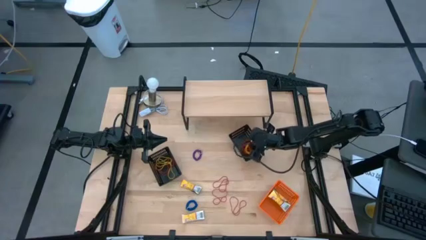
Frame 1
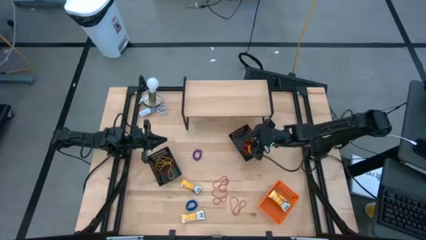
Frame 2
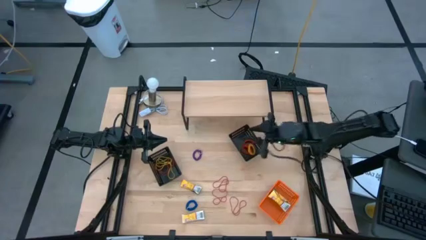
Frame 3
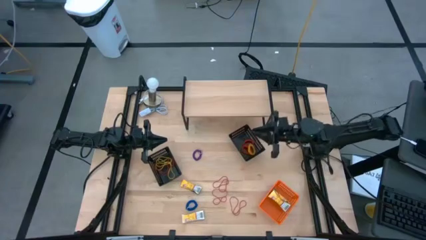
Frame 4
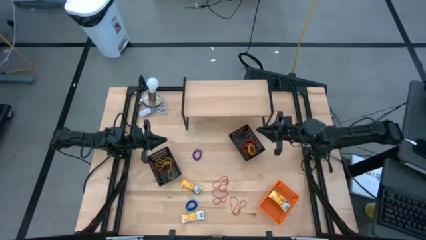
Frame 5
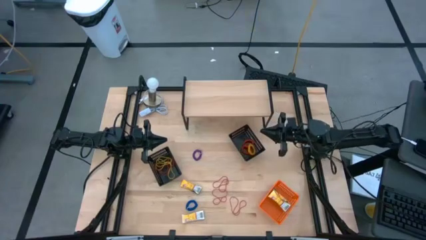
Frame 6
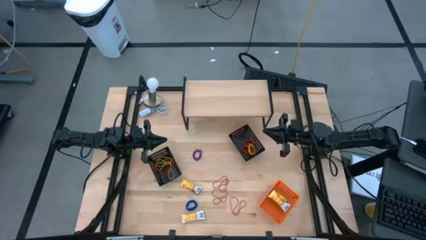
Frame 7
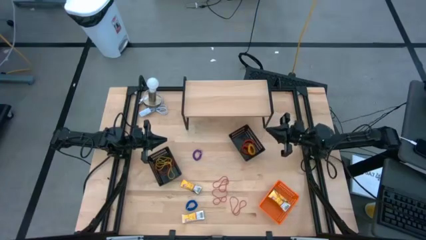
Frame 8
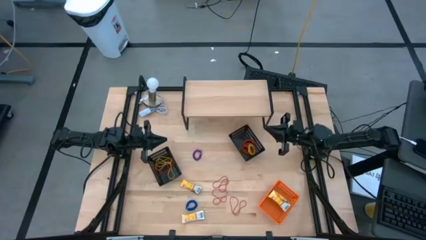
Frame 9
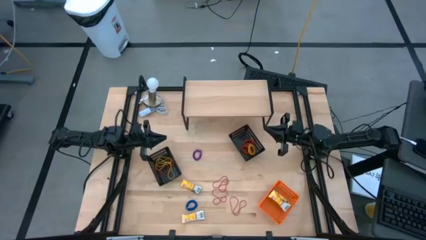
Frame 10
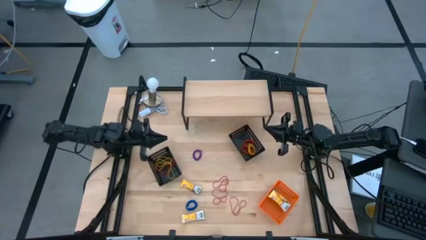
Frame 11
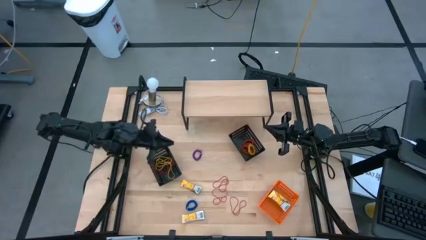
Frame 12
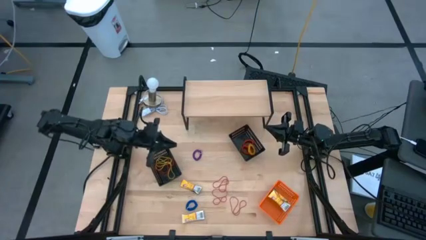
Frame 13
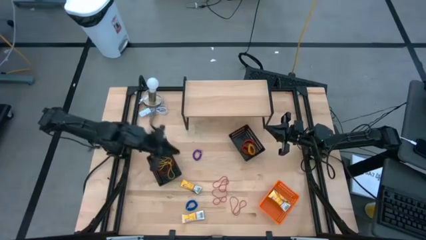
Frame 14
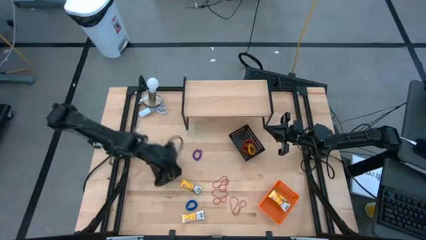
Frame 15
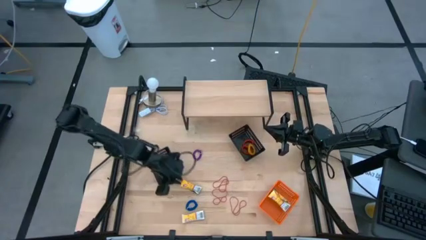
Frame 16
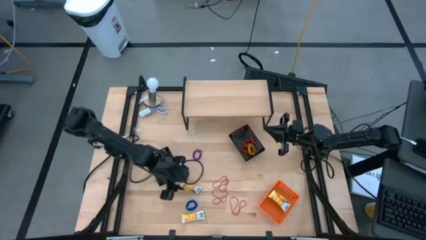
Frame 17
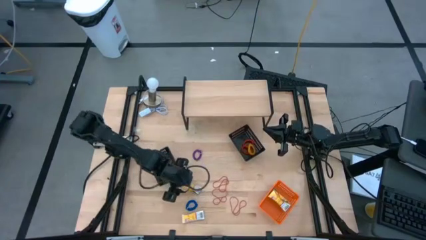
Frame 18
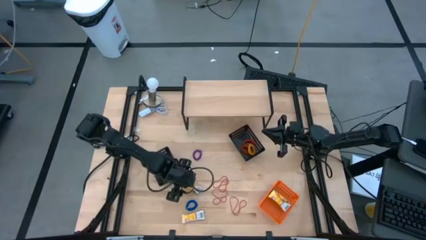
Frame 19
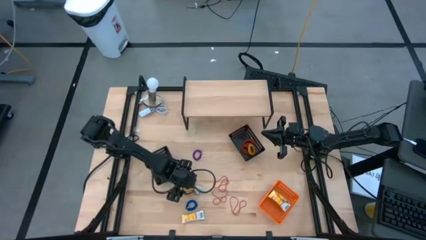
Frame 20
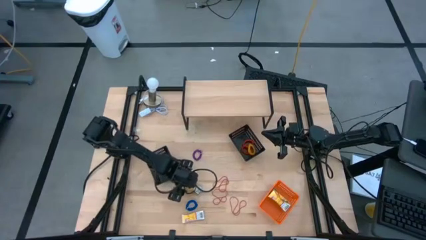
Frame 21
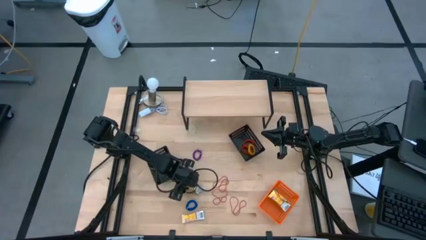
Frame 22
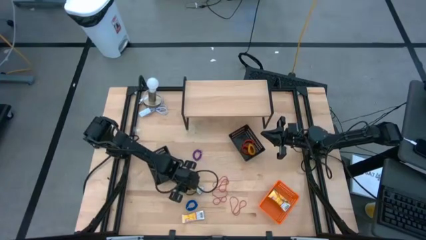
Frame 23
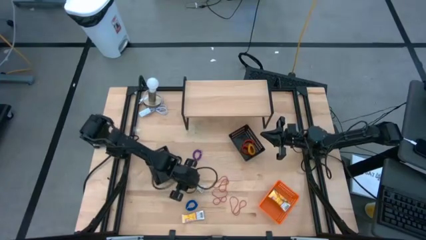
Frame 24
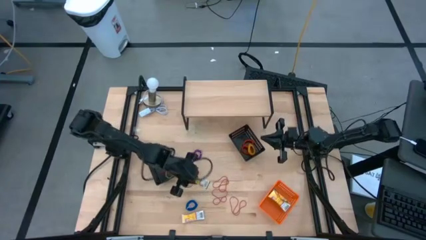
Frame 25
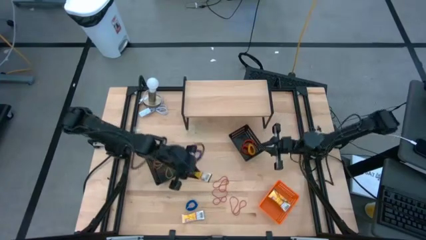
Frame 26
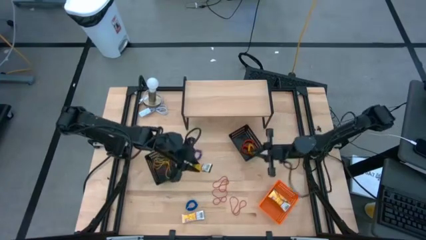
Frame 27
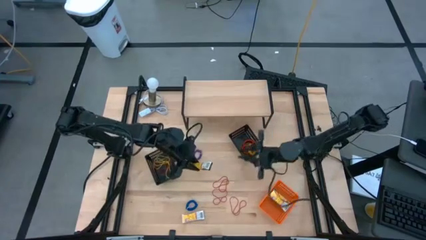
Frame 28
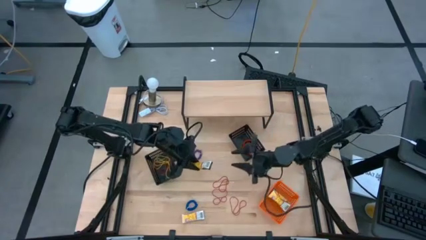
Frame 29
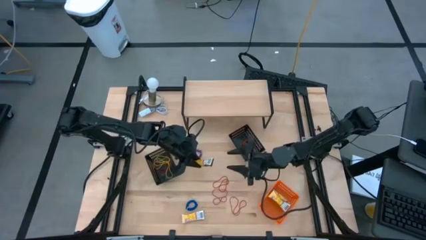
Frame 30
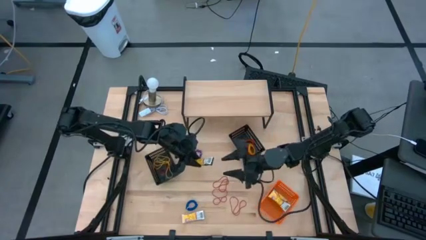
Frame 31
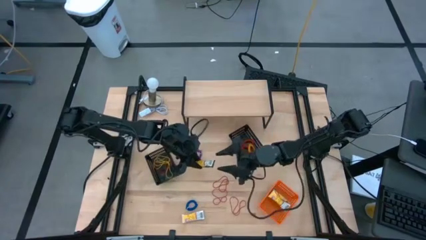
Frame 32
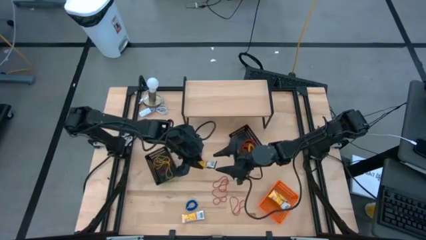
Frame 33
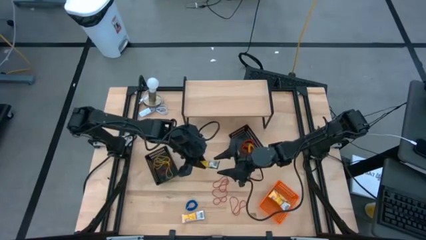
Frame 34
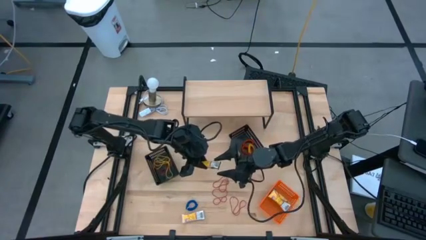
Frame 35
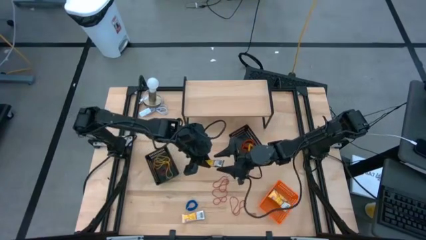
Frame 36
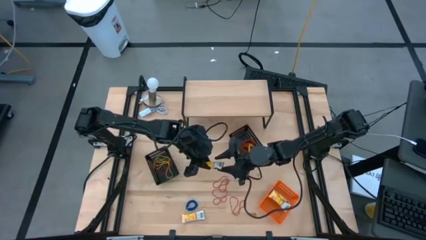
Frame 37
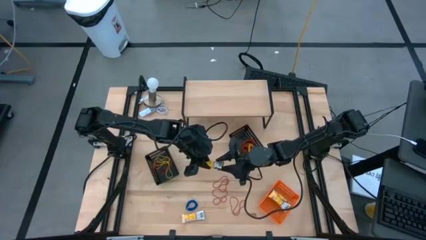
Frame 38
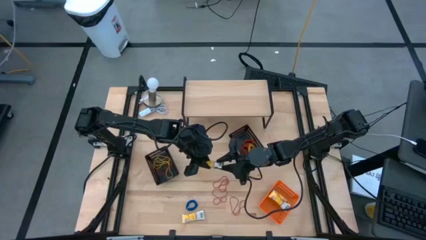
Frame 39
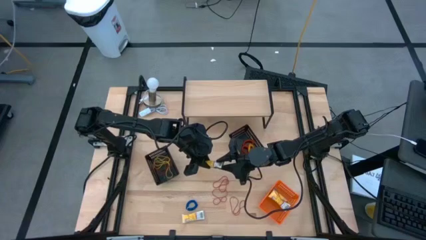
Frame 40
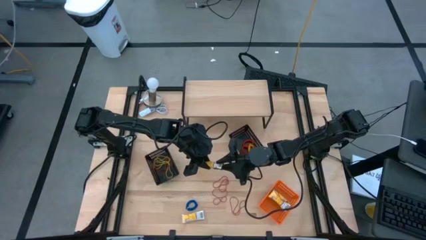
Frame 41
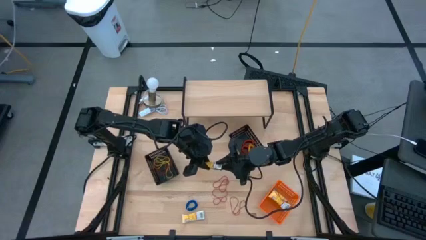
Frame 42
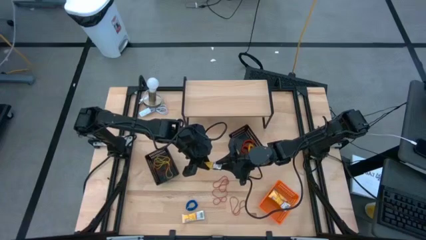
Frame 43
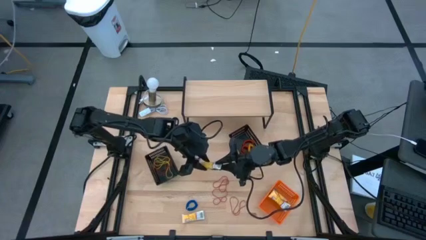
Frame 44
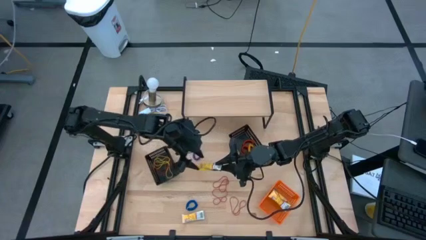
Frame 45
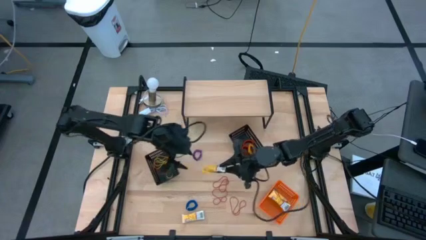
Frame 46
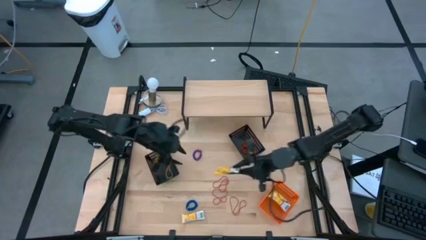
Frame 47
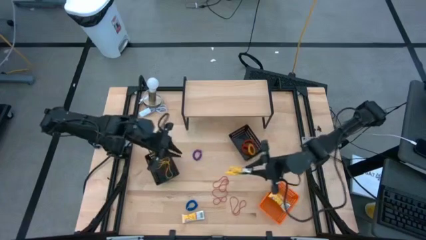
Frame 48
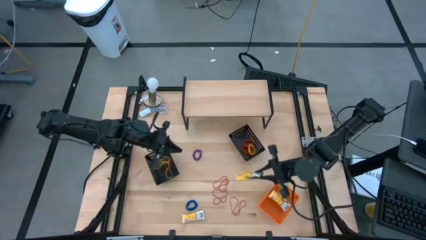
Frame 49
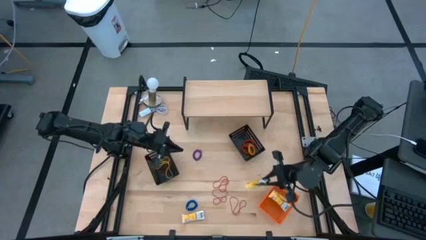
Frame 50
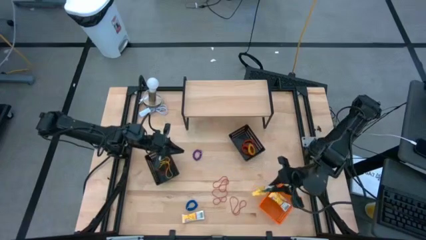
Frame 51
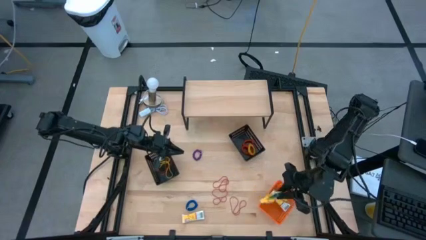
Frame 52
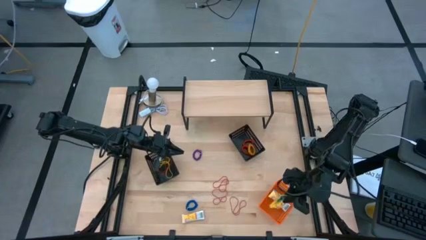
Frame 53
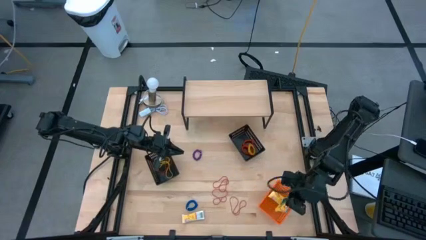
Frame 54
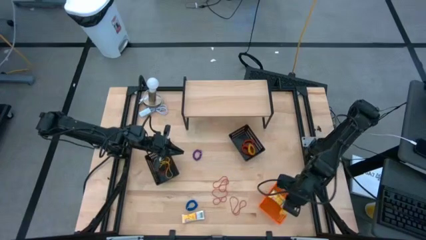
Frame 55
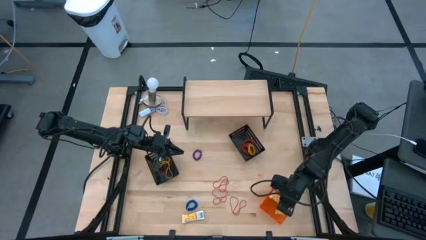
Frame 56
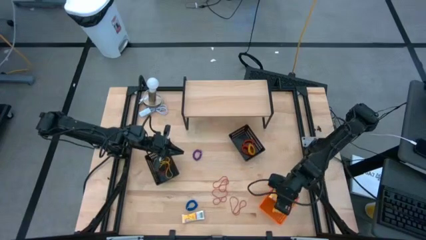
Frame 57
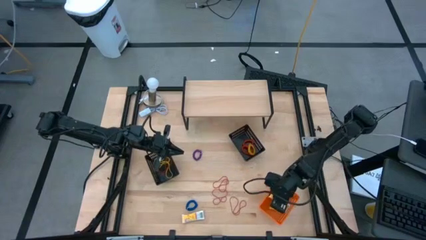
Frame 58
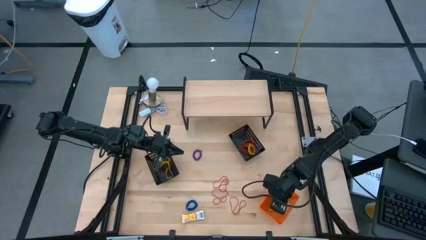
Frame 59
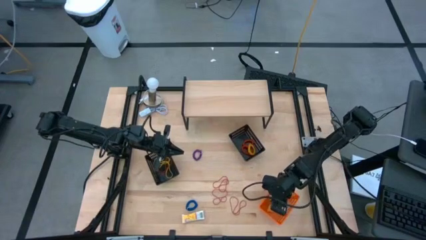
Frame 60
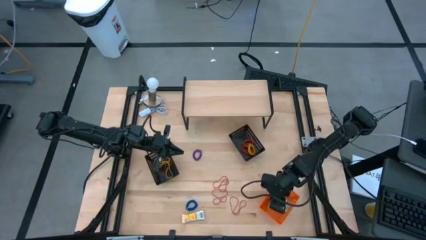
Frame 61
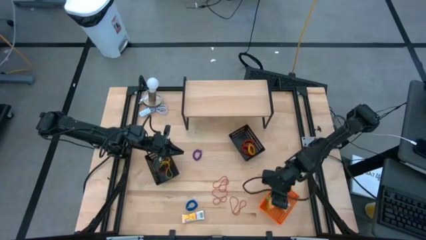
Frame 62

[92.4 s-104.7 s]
Task: Pick & Place Office Desk Supplies
Put the yellow crayon box into the orange bin

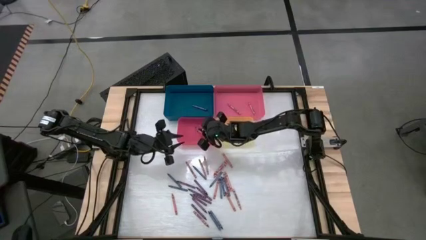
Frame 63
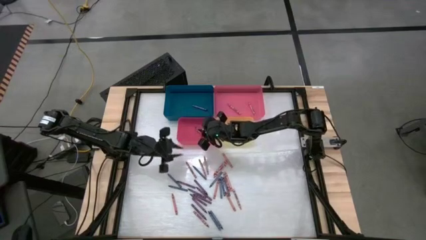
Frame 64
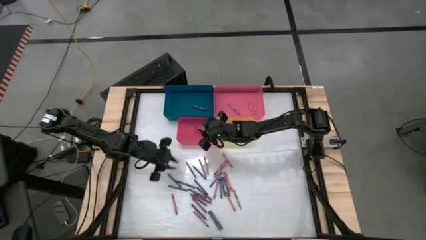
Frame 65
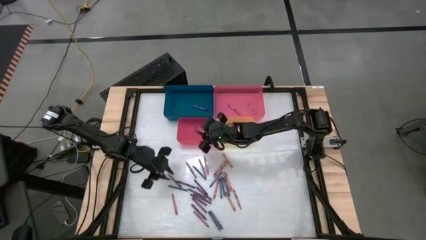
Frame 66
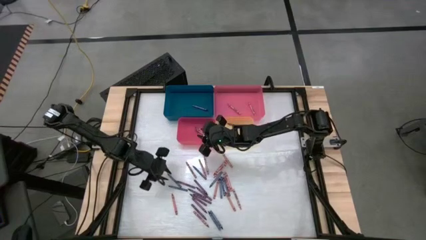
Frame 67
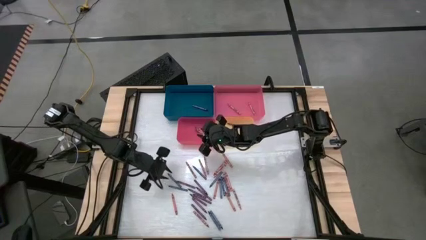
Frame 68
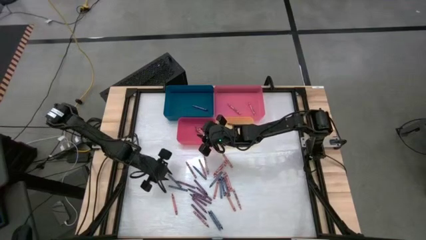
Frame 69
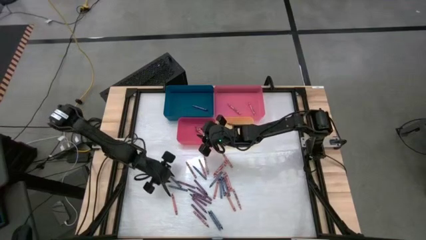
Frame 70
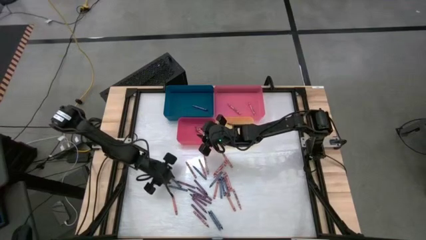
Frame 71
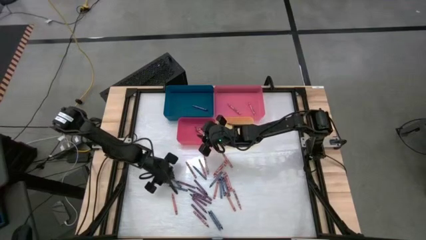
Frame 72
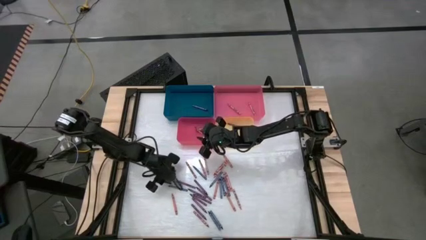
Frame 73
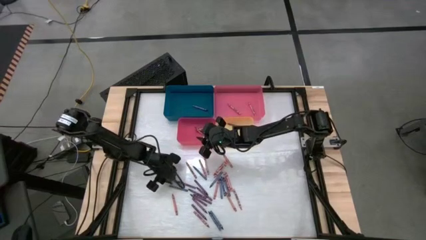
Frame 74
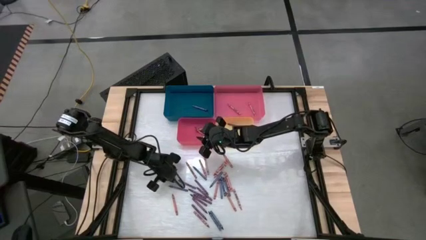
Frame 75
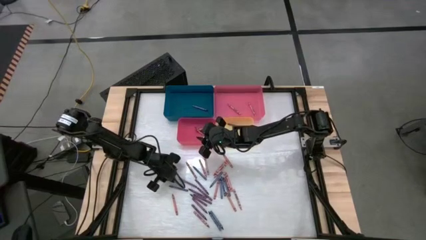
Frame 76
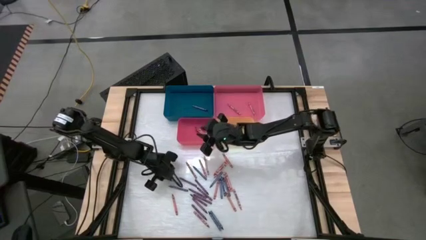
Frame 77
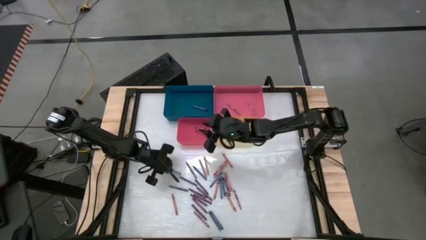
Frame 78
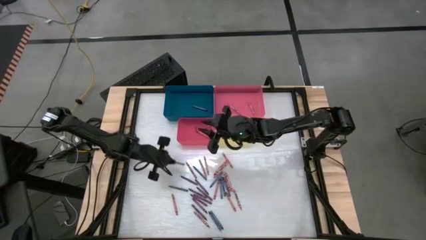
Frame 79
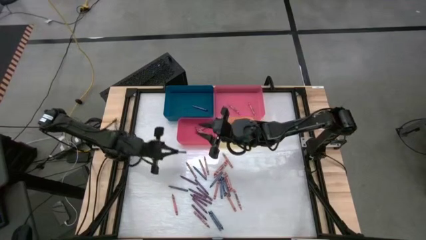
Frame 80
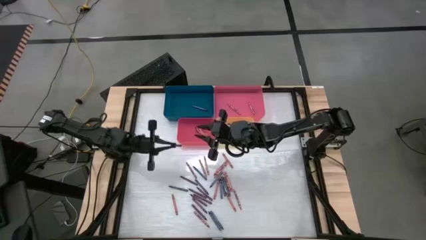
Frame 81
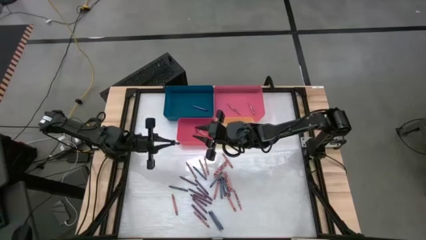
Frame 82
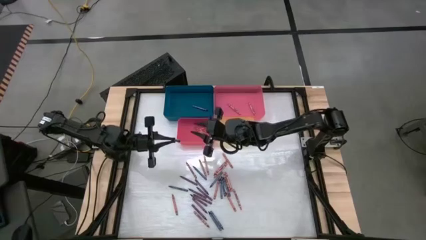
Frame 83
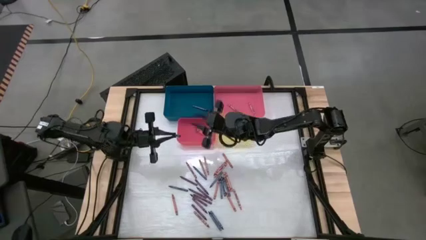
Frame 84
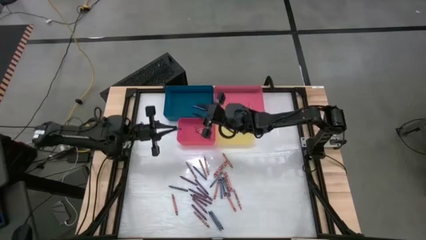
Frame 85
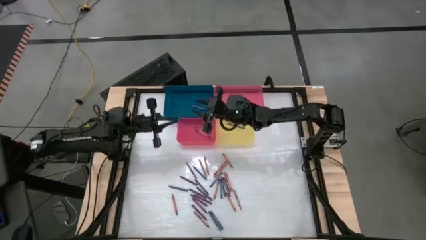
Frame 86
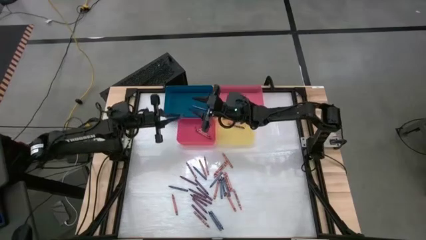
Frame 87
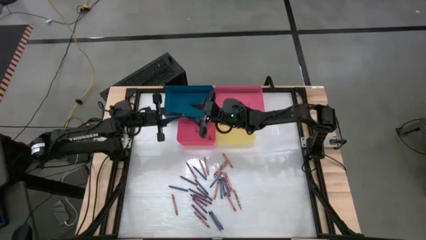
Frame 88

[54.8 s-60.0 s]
Task: Sort crayons
Put the blue crayon into the blue bin
